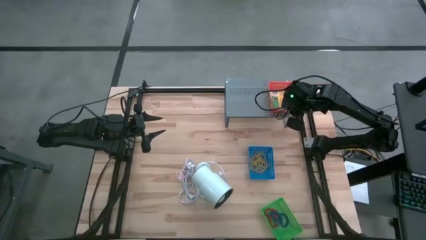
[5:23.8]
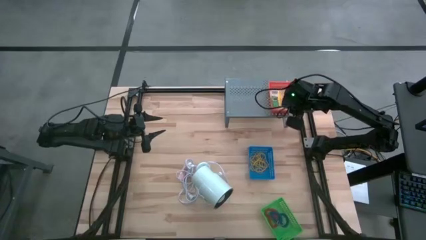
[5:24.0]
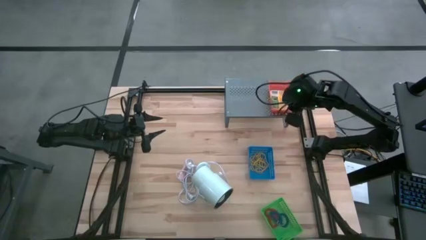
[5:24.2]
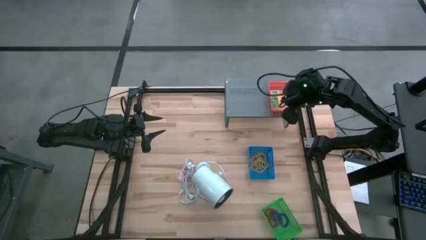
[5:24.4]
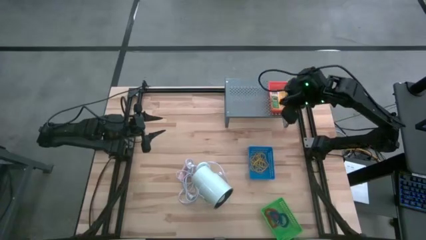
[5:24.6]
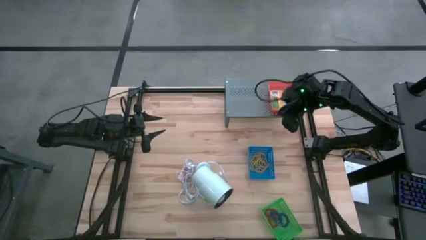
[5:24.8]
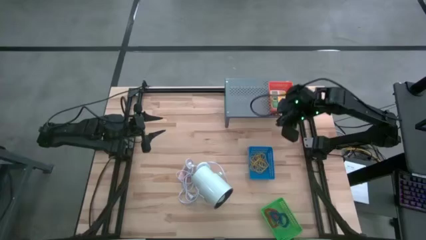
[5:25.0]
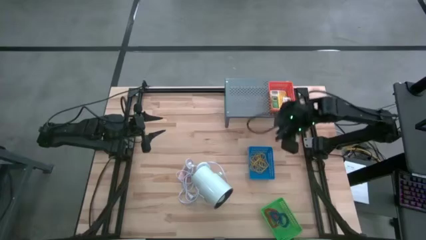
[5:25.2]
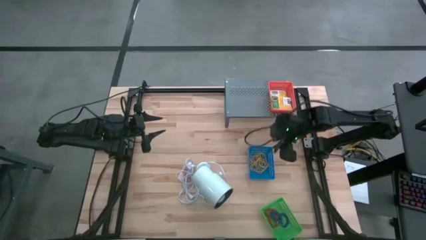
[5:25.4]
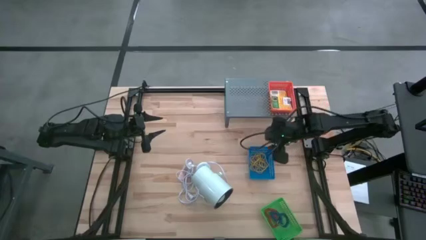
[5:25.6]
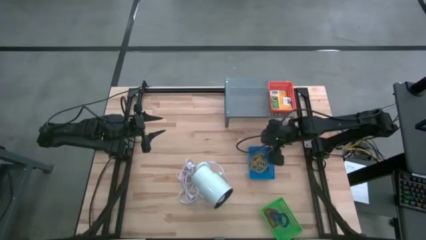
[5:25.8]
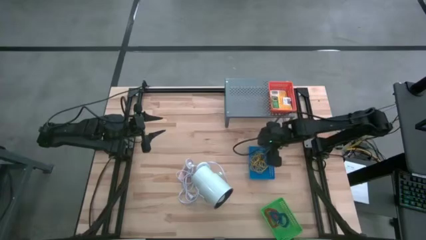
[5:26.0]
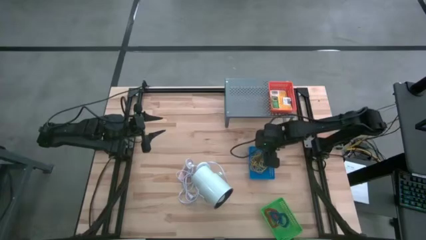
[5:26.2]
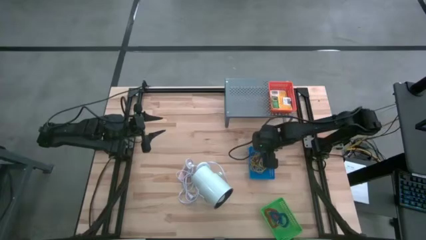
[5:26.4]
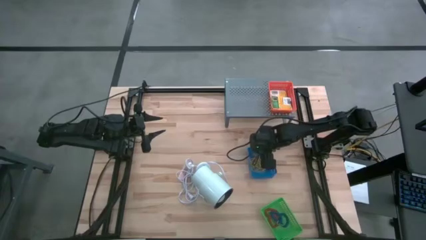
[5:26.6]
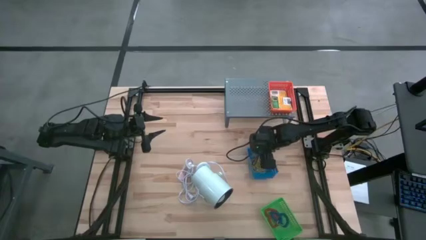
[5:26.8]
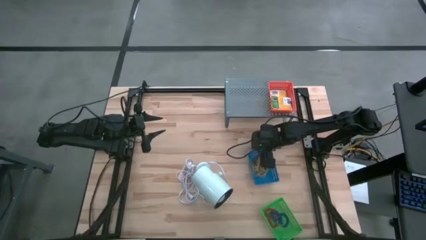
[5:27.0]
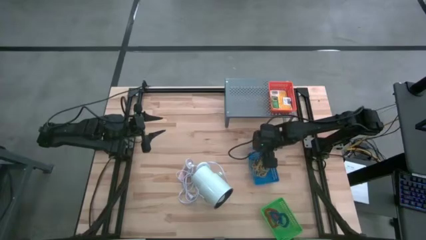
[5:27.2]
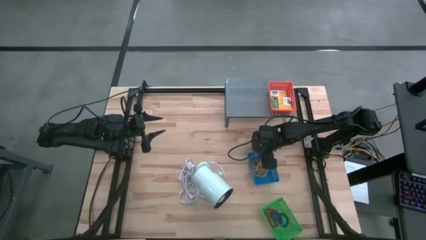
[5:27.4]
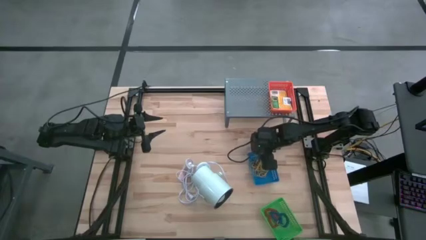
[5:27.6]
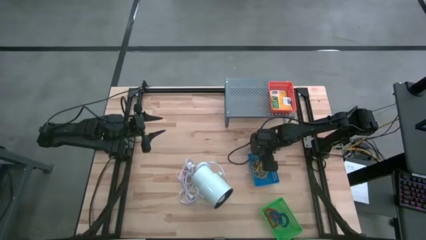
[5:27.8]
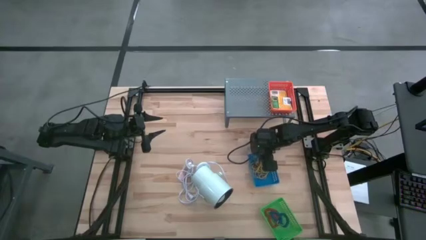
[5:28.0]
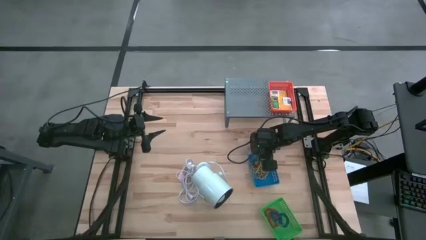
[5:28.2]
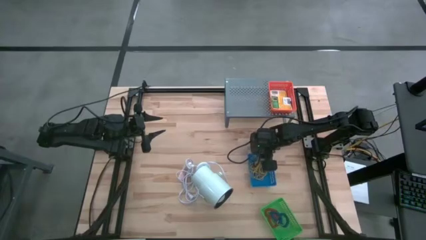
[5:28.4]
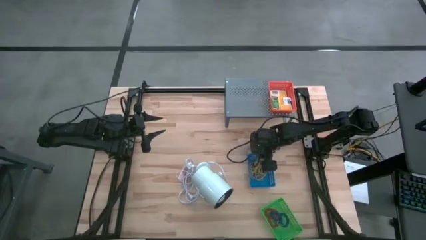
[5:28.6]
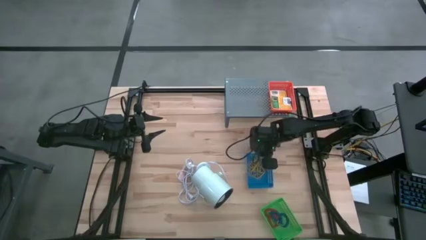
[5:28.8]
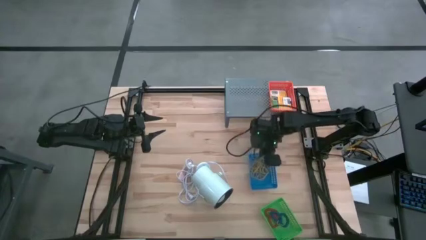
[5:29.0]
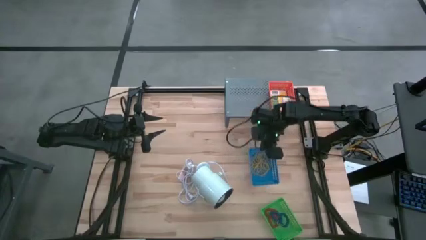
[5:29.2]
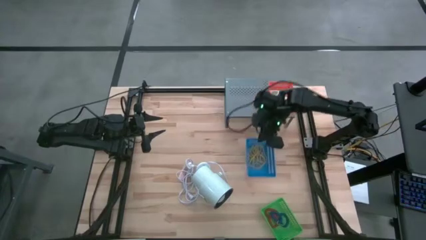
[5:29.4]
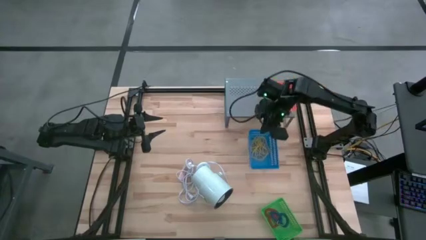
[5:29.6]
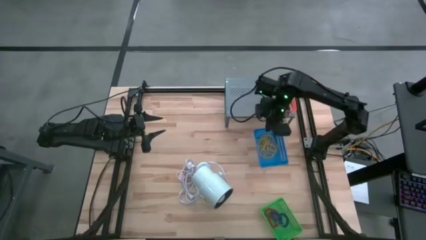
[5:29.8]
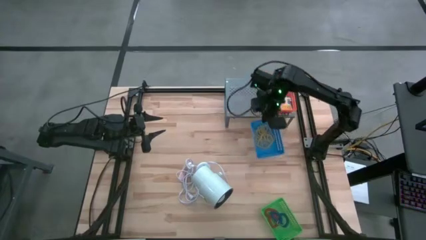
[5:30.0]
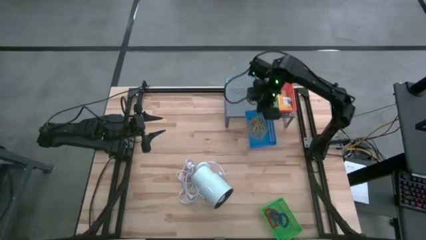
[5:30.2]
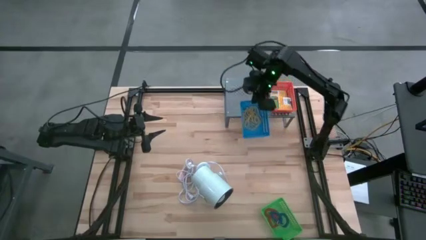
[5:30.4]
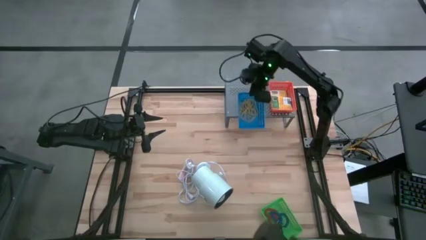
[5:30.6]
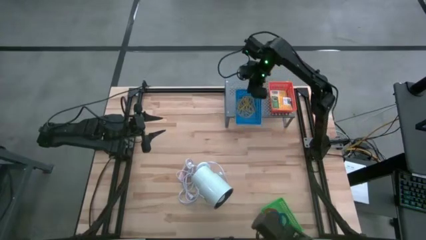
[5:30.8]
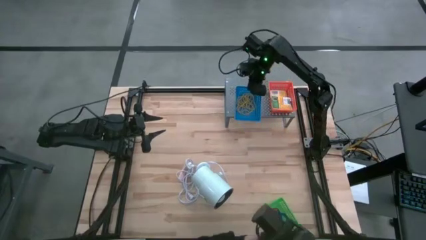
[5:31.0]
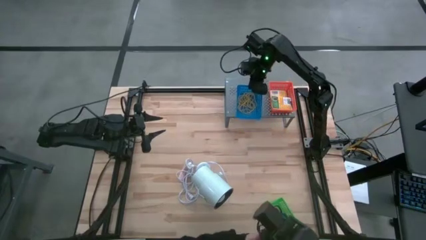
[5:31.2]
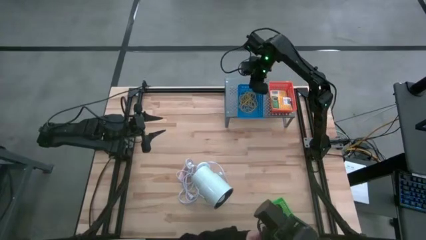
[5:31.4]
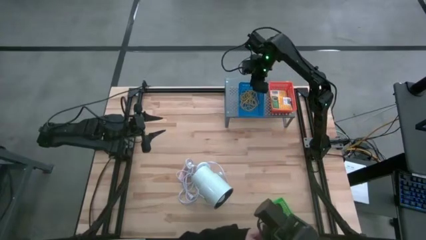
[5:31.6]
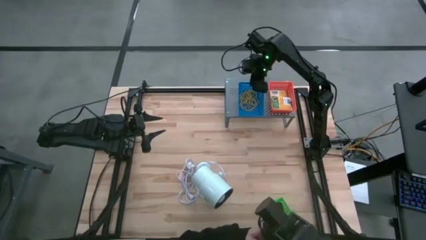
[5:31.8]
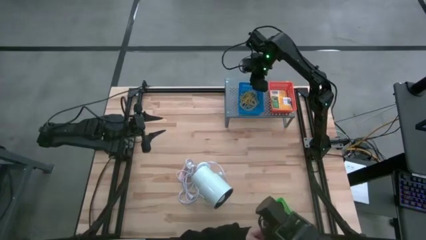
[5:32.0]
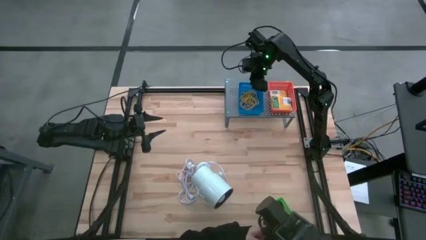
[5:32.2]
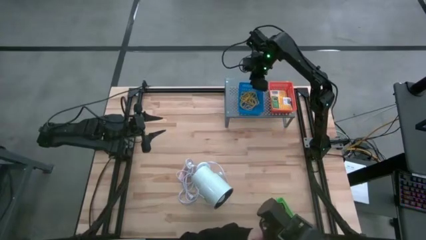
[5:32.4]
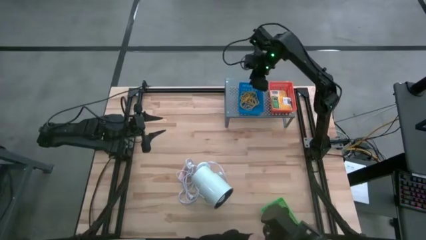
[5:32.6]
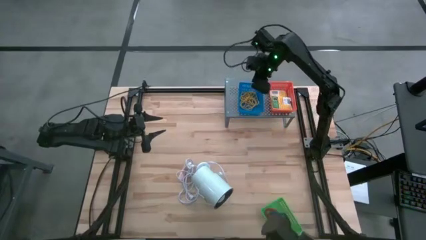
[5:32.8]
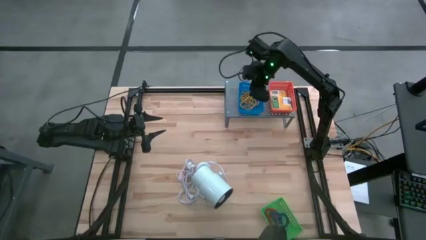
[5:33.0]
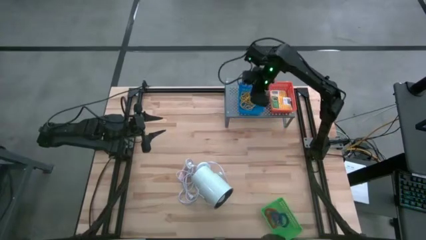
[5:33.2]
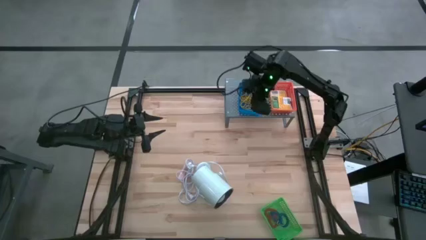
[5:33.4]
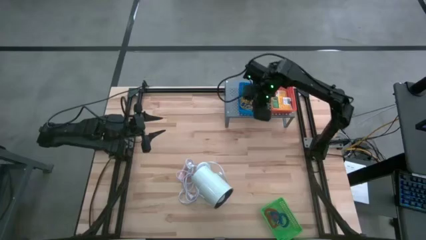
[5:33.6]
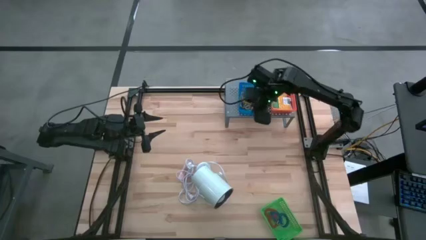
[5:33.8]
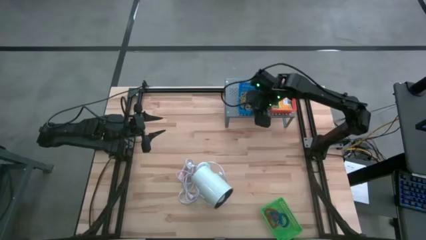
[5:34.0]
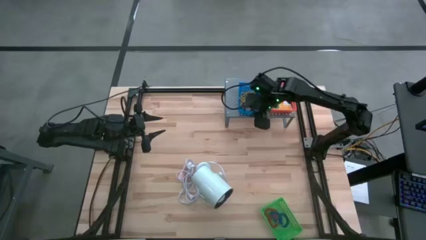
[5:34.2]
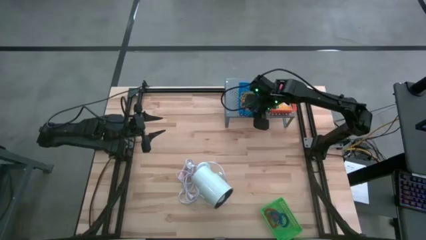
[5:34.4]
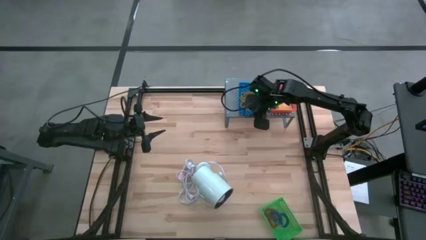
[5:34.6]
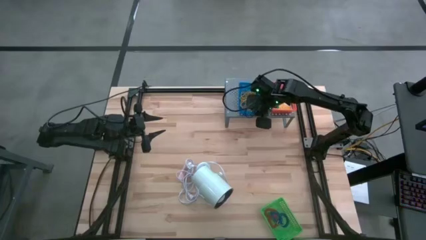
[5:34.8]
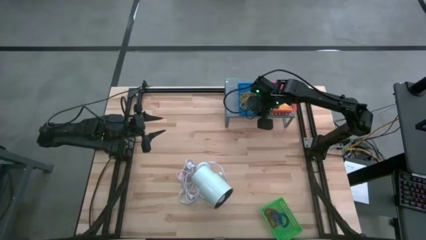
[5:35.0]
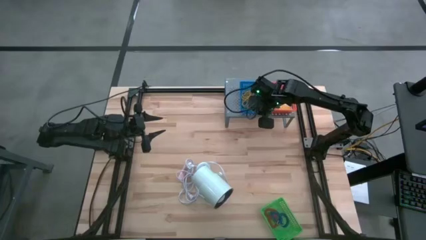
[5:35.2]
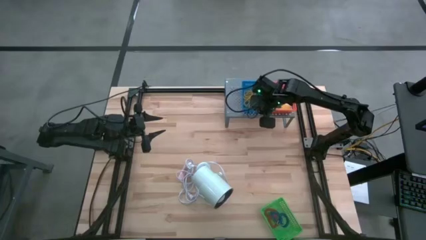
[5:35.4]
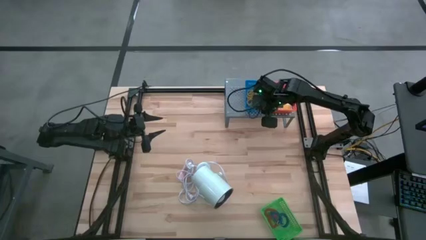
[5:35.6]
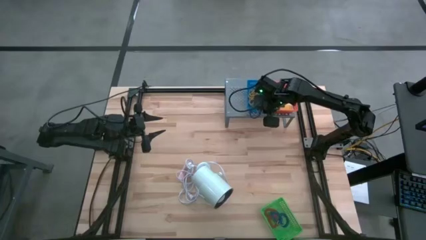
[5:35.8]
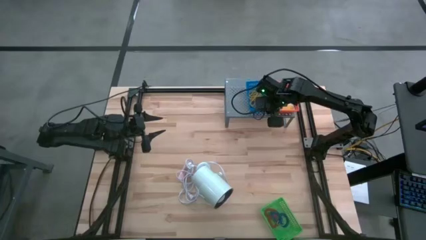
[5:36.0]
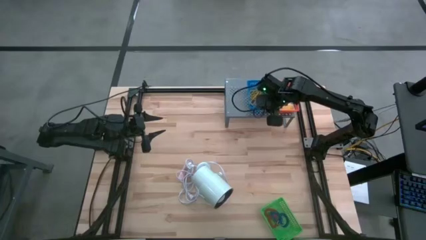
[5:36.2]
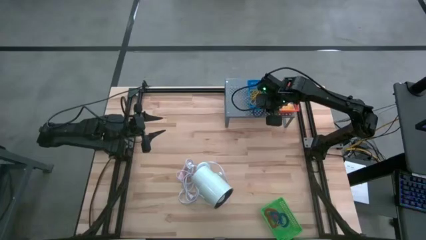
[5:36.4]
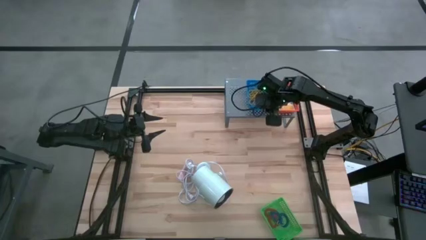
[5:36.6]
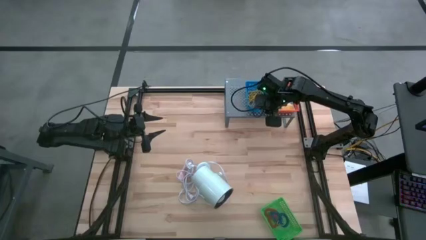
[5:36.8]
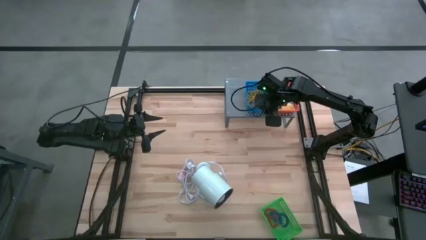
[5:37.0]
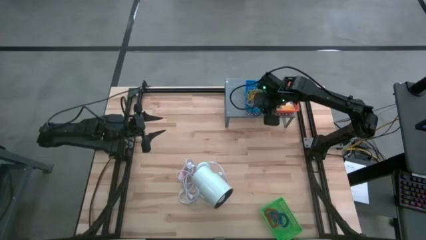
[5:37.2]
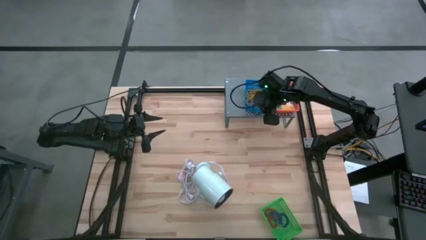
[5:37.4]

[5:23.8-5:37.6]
Task: Pick & Place Office Desk Supplies
Put the blue bin with the sorted rubber bands on the shelf
